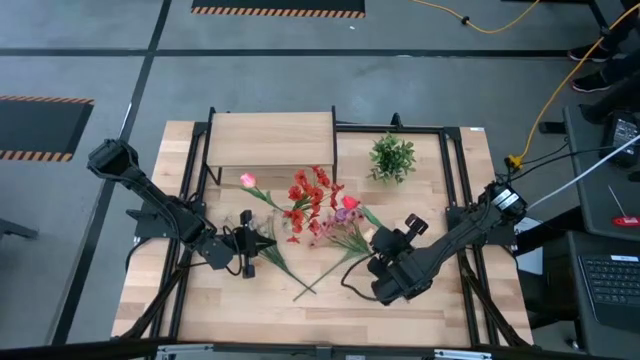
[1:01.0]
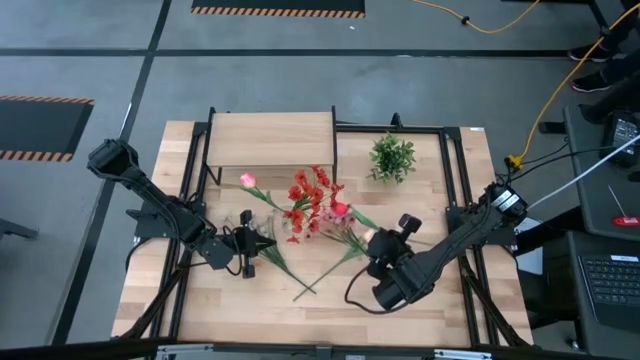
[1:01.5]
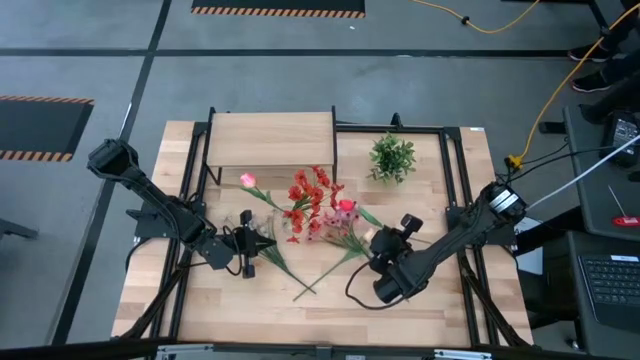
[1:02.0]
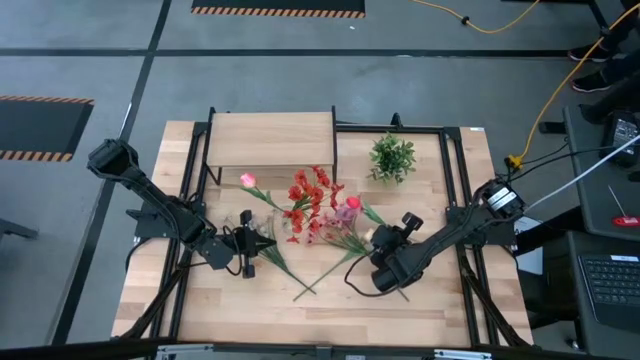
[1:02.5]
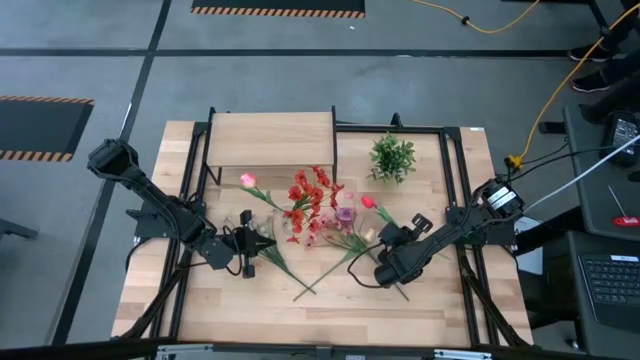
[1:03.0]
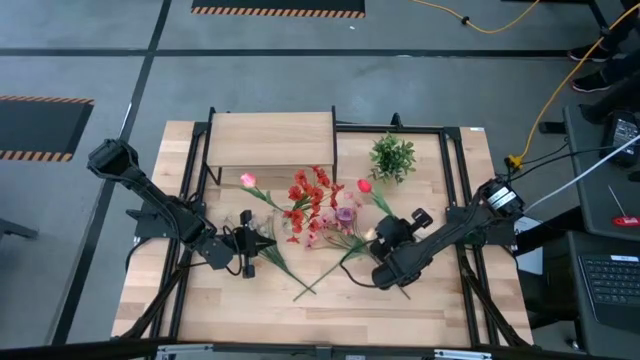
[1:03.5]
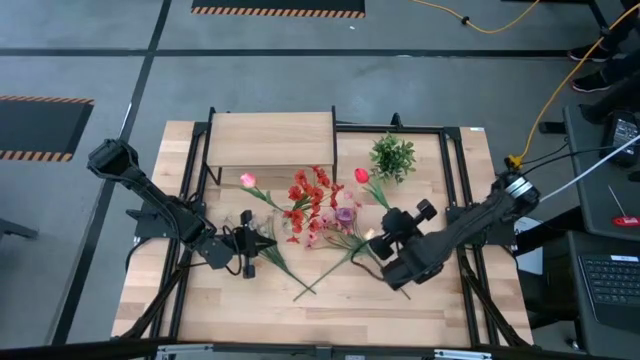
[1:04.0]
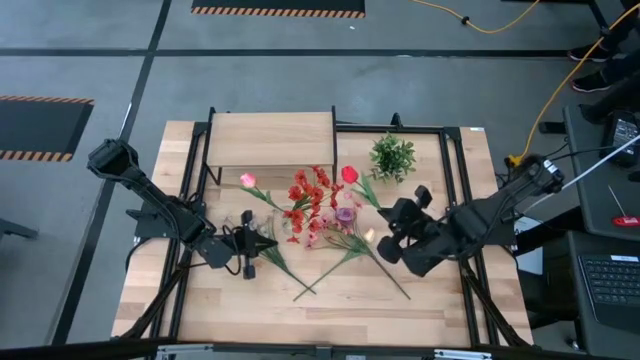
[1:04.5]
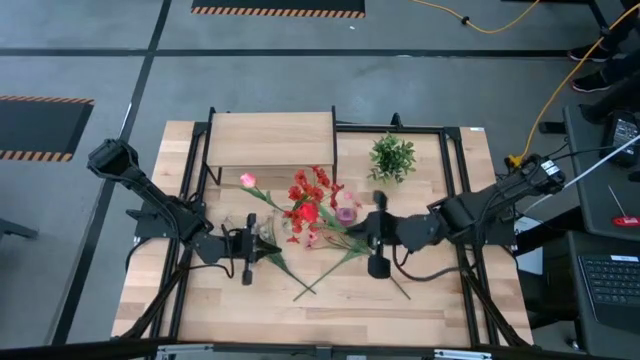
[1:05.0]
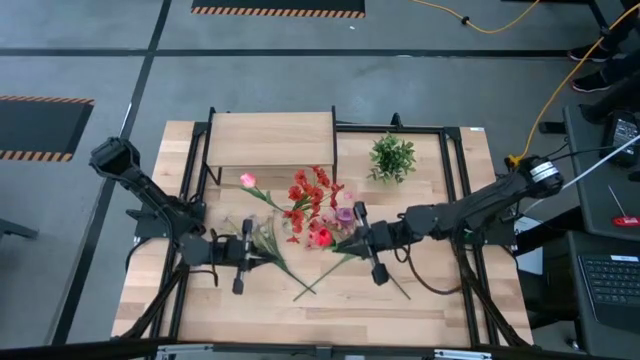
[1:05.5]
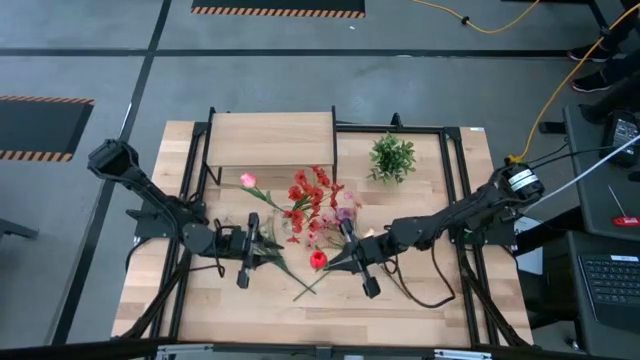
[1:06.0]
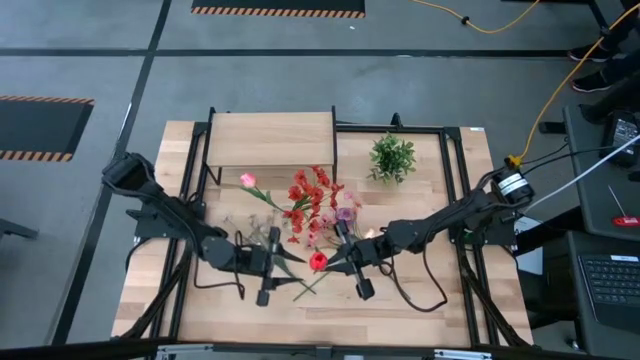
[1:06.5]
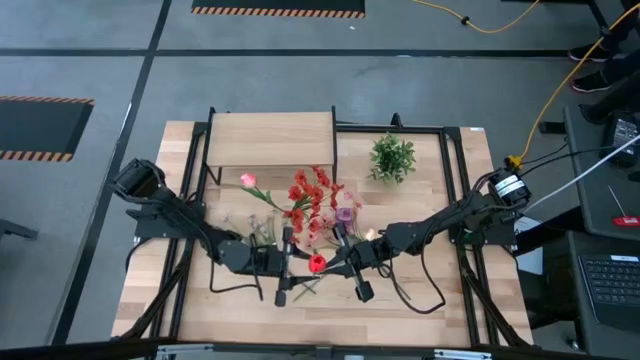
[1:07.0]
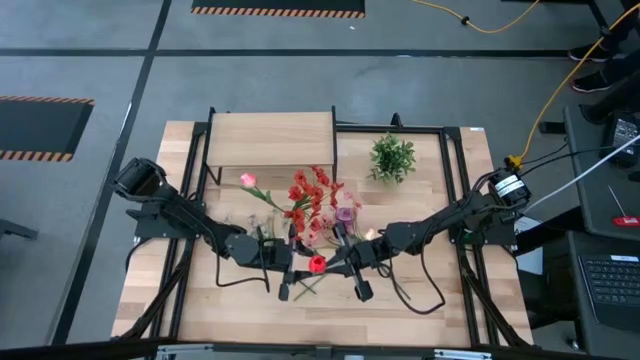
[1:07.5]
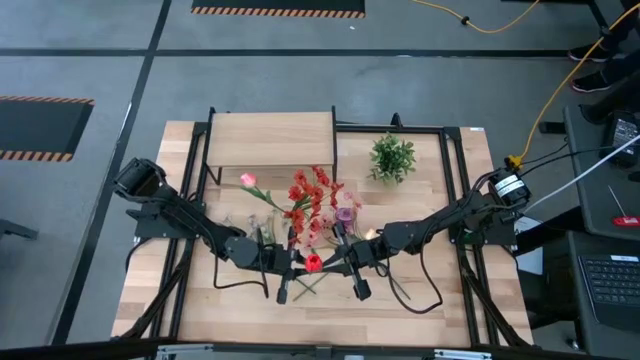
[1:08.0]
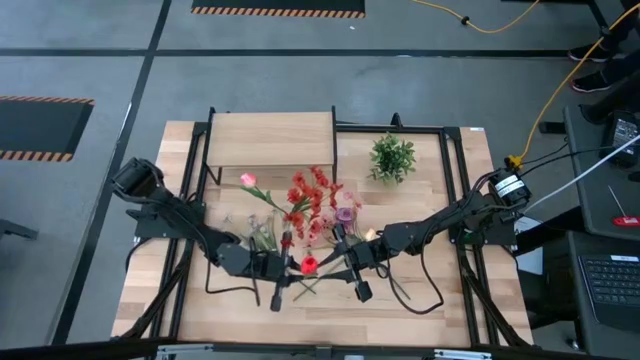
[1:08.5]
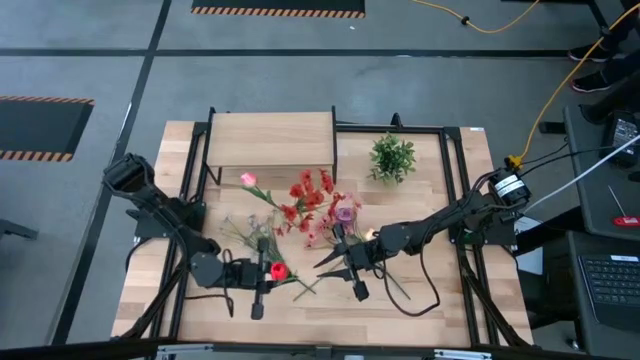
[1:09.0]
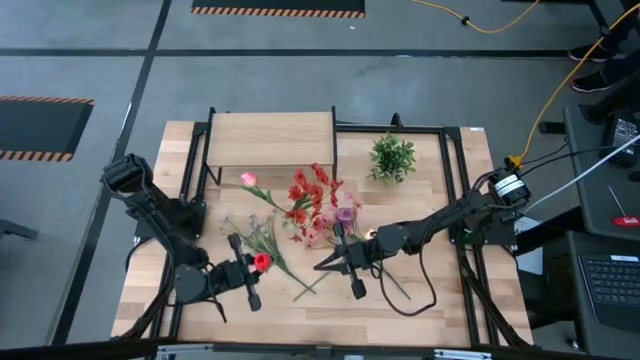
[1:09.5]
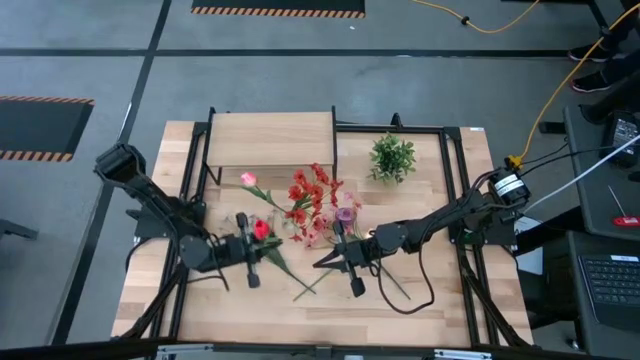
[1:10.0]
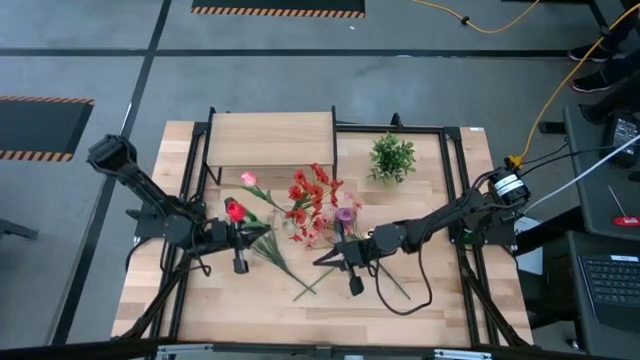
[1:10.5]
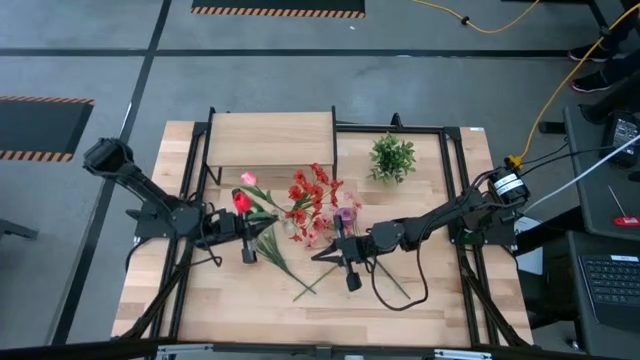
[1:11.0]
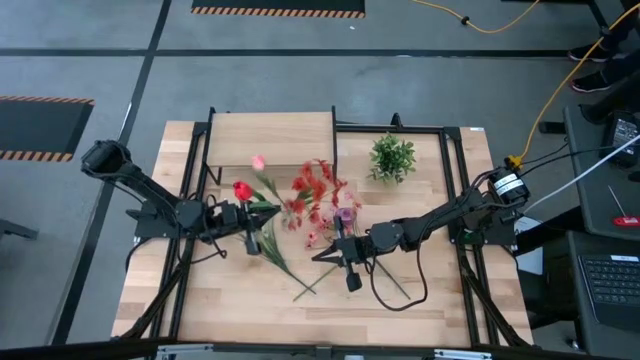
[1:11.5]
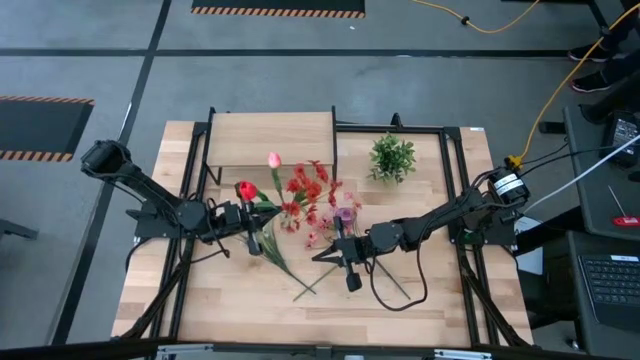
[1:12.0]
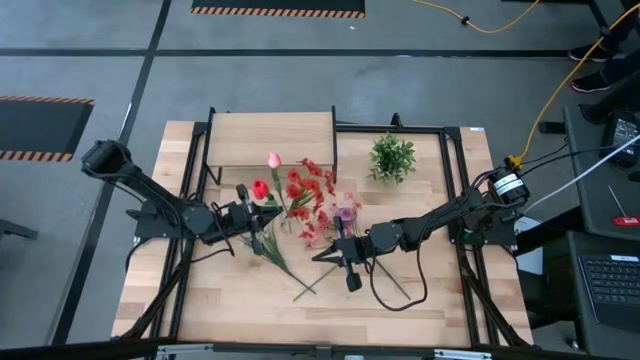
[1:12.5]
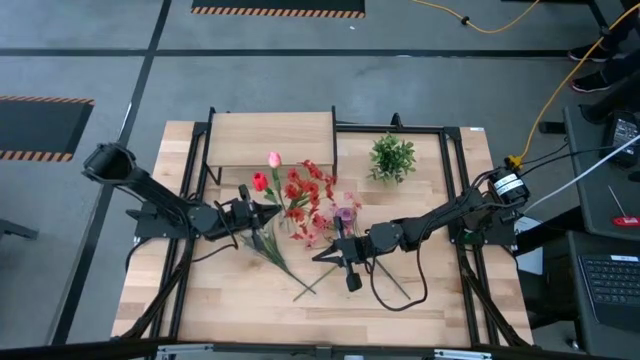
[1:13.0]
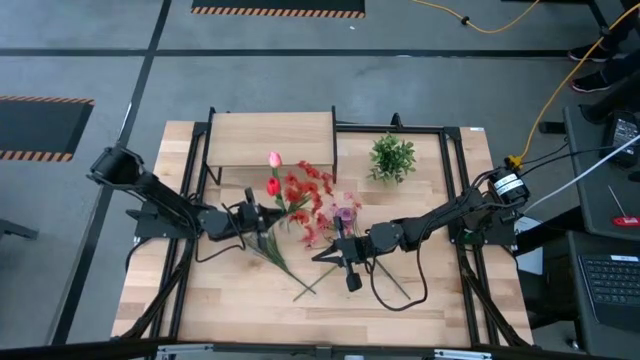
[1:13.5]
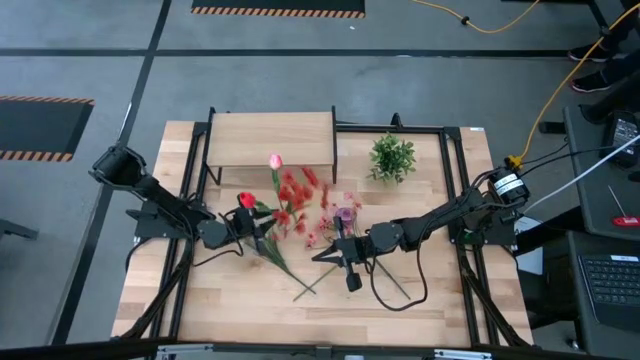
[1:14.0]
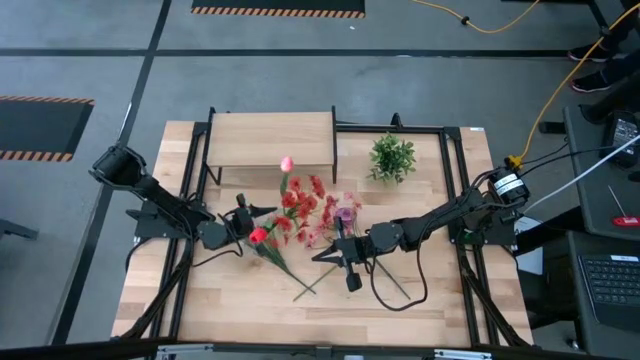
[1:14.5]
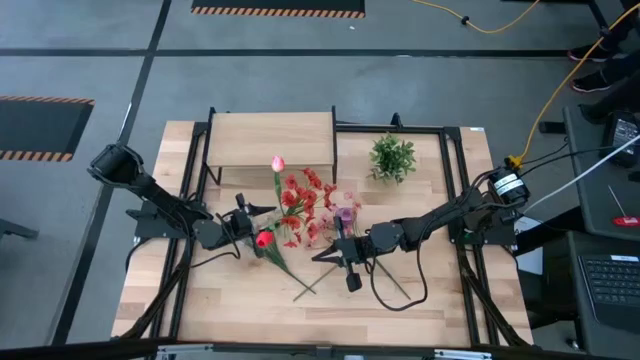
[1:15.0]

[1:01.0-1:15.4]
Task: Pick and place flowers into a vace then onto a shelf
Put the red tulip into the transparent vase

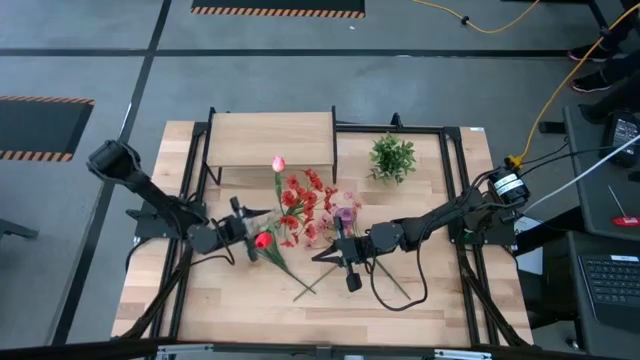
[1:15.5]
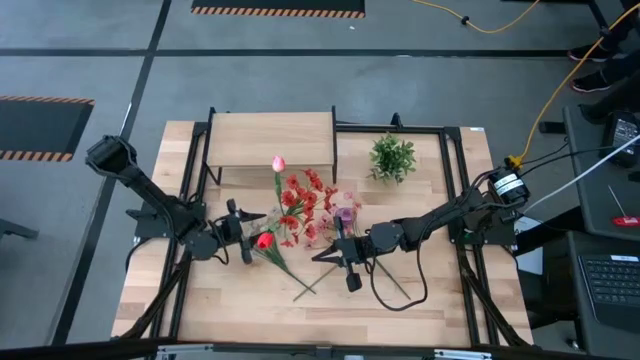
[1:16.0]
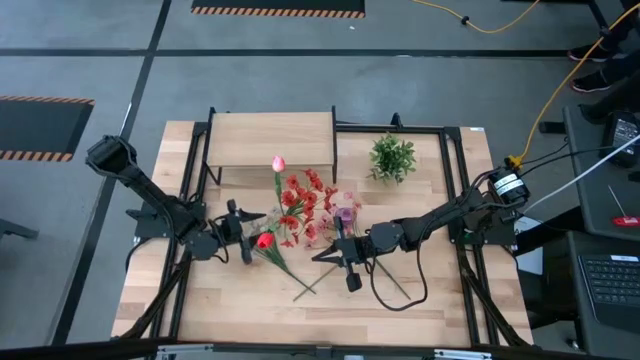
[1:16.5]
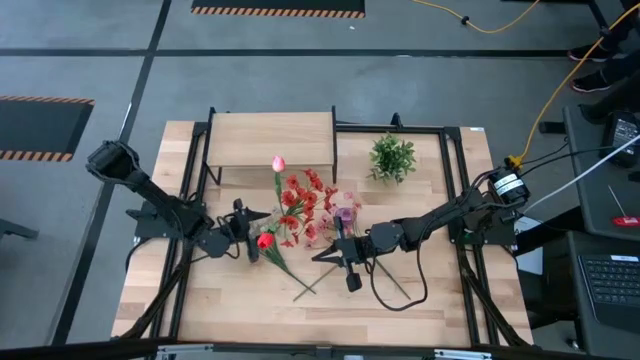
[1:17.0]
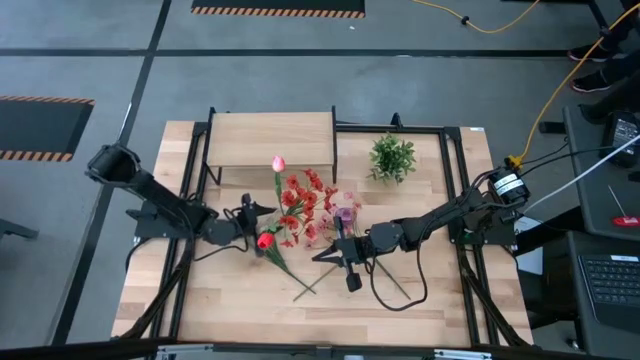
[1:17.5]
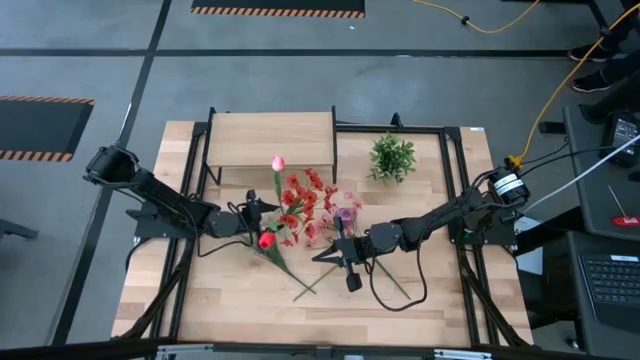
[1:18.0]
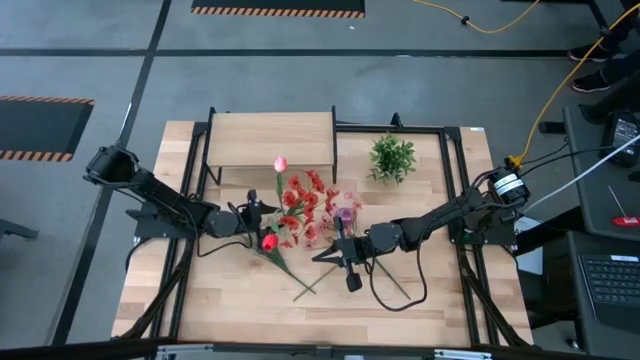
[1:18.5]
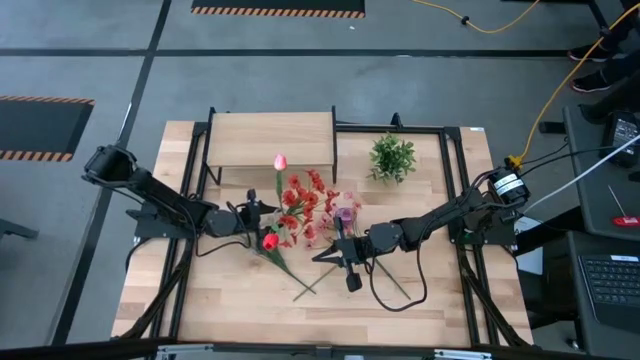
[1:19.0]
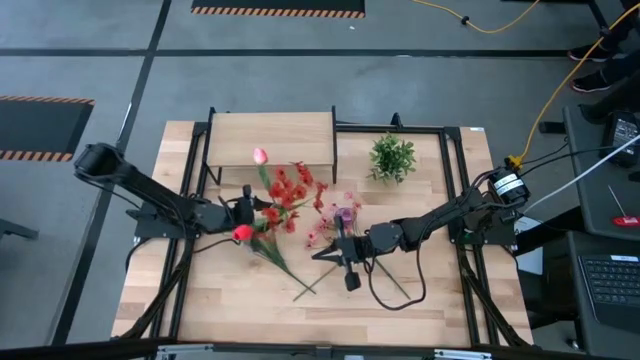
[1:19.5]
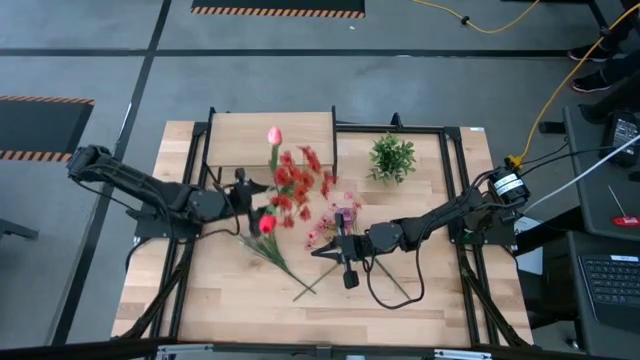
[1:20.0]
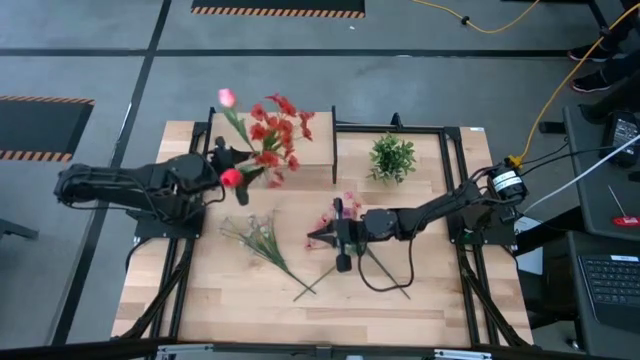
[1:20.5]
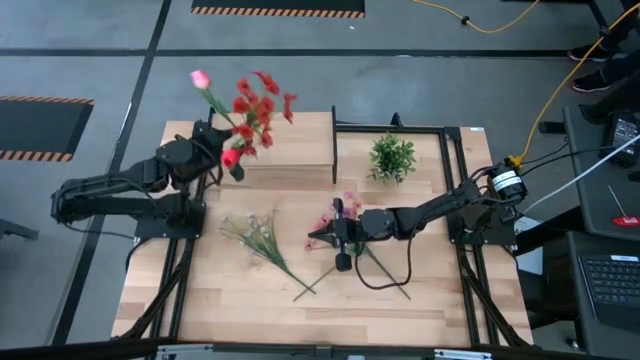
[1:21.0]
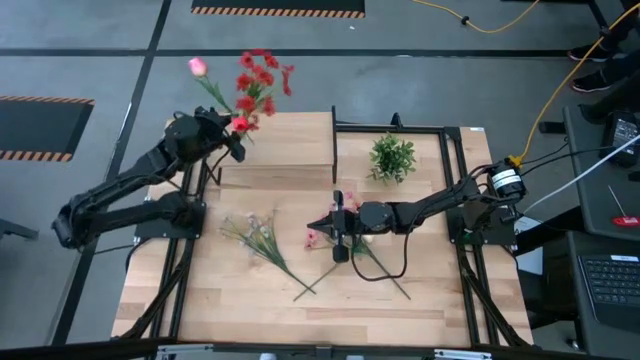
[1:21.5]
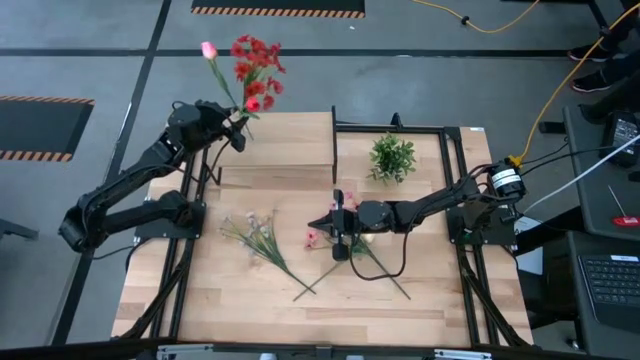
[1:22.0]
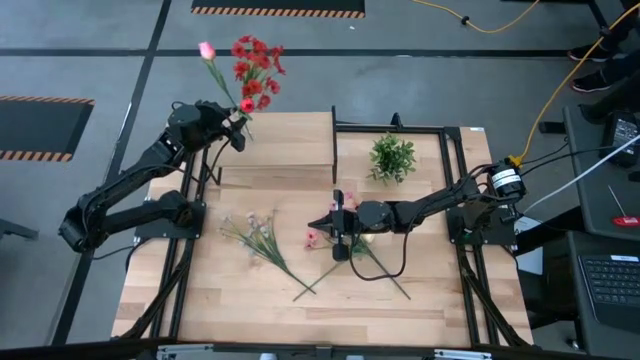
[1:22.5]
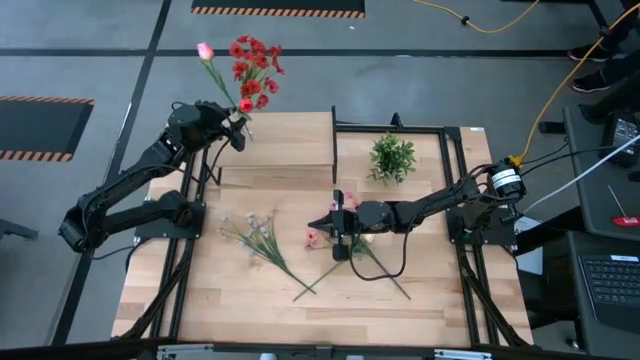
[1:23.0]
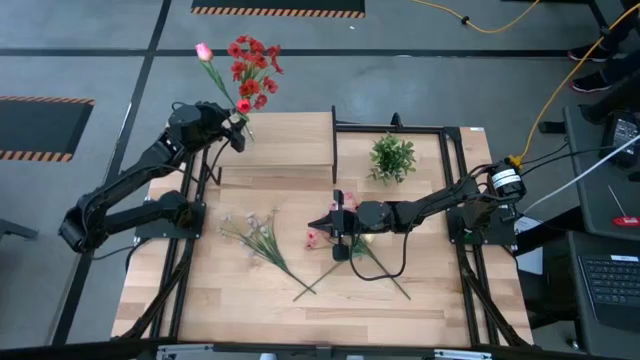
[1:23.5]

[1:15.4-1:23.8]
Put the transparent vase on the shelf
